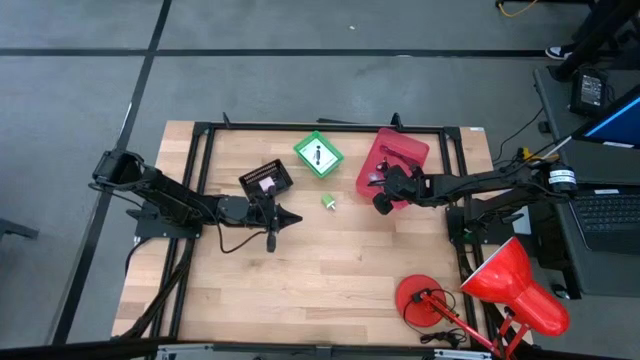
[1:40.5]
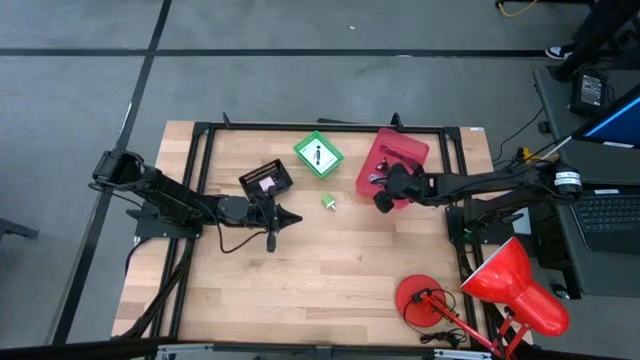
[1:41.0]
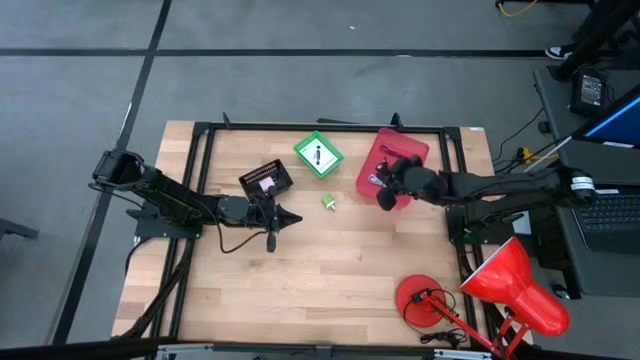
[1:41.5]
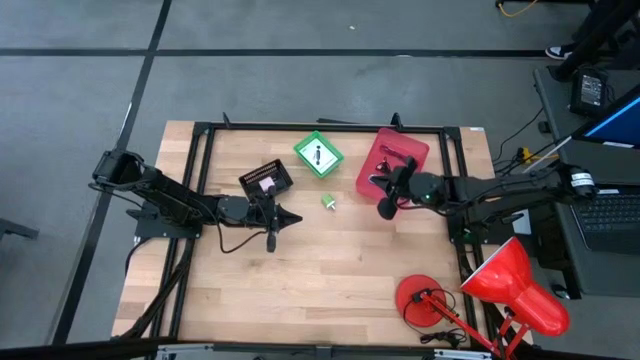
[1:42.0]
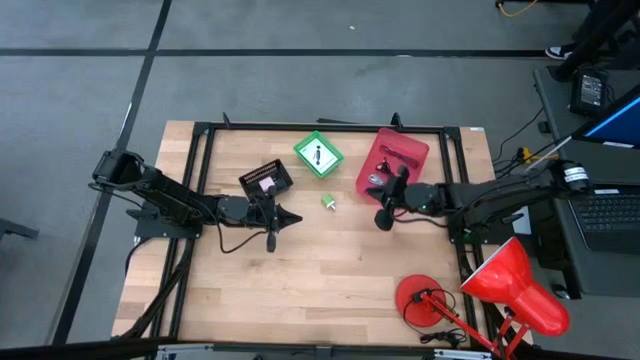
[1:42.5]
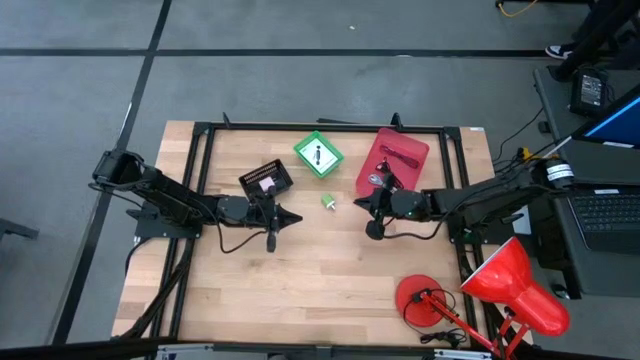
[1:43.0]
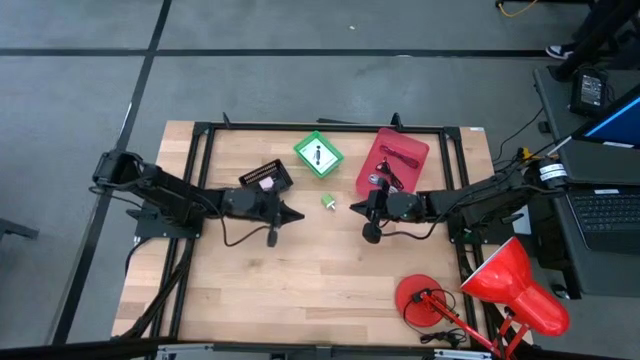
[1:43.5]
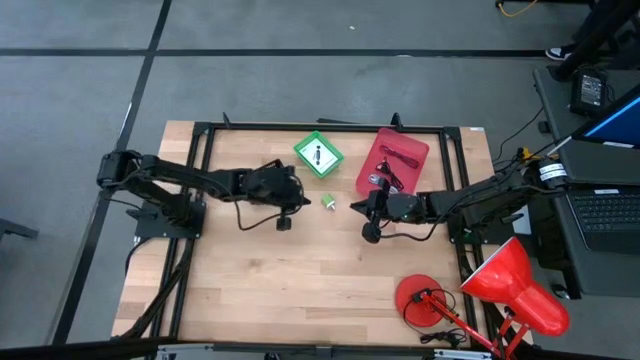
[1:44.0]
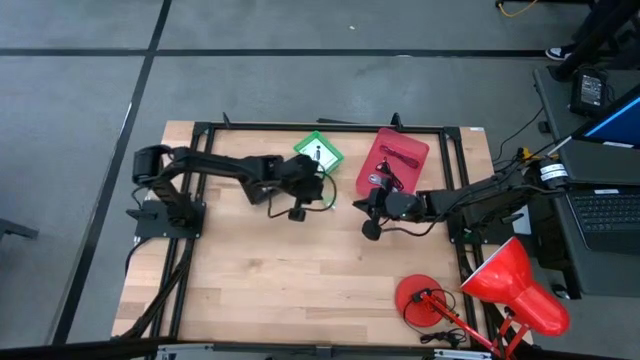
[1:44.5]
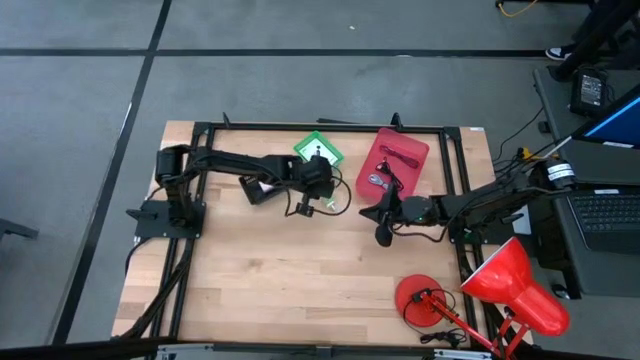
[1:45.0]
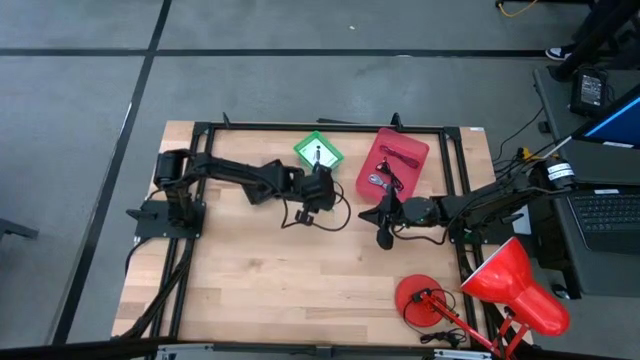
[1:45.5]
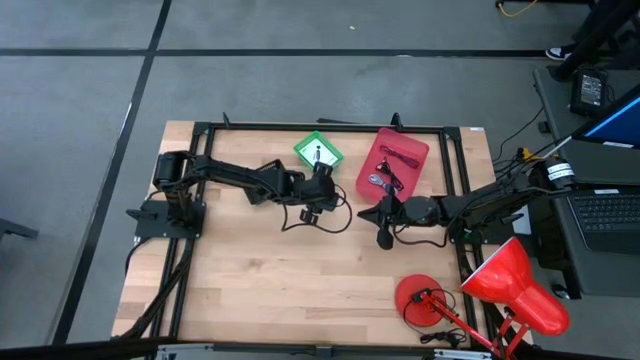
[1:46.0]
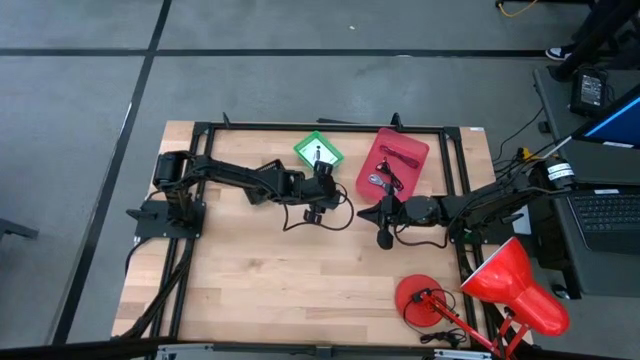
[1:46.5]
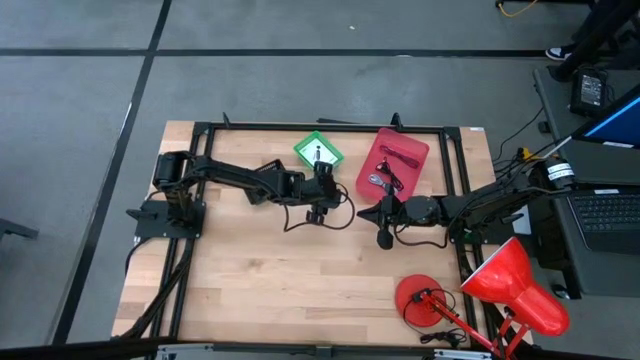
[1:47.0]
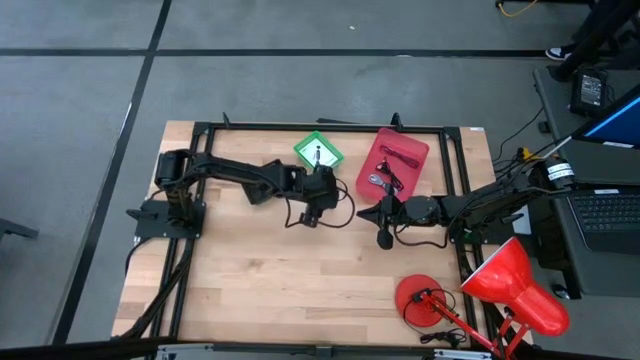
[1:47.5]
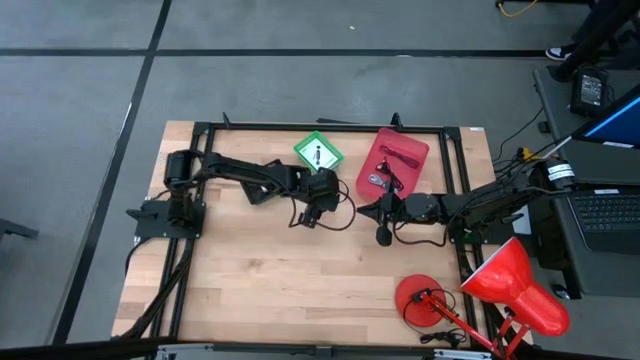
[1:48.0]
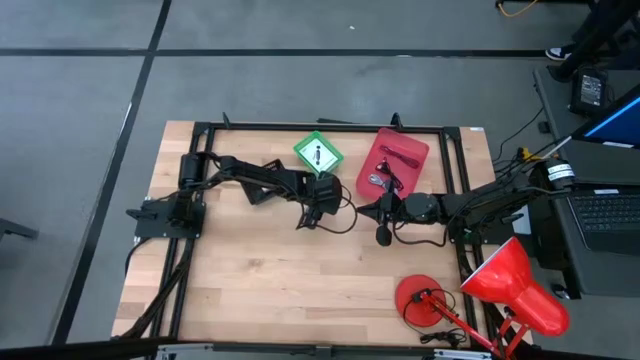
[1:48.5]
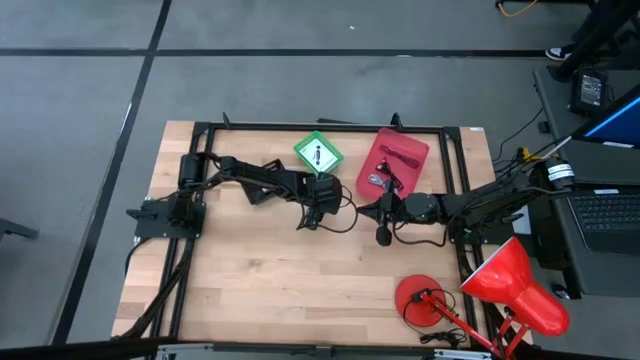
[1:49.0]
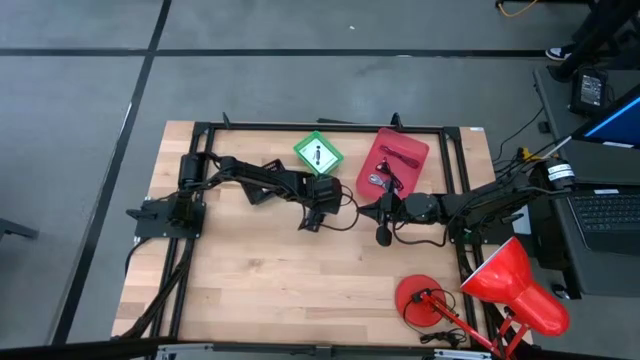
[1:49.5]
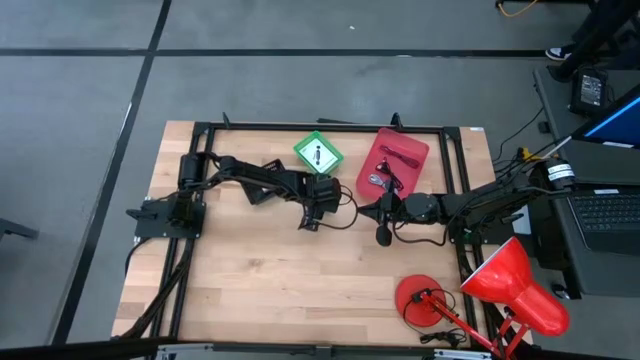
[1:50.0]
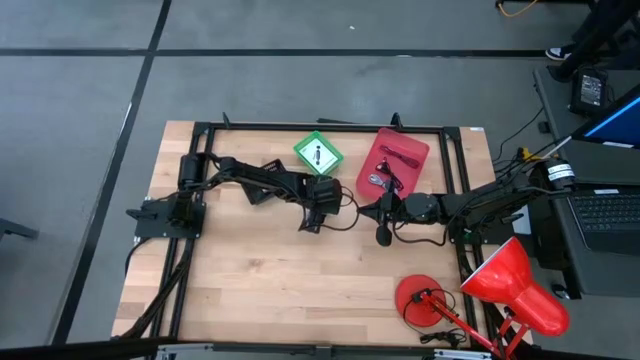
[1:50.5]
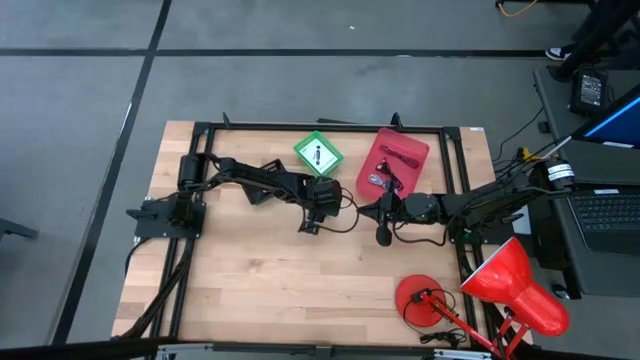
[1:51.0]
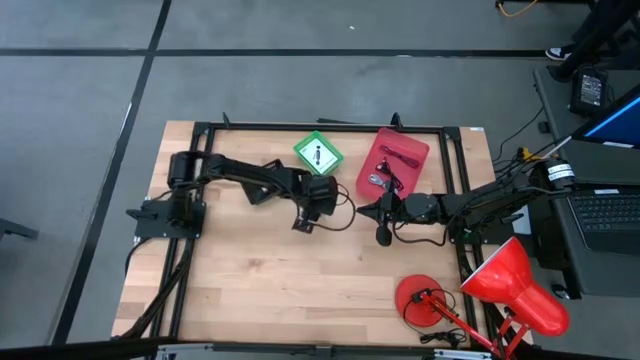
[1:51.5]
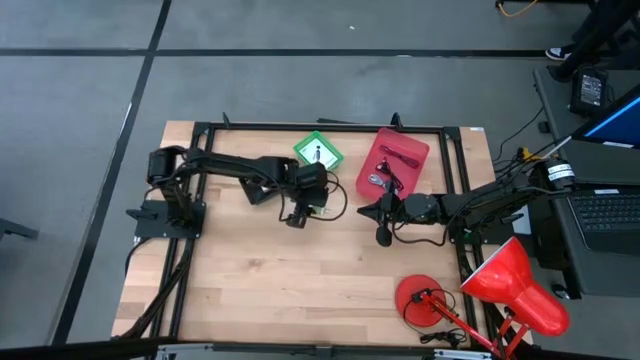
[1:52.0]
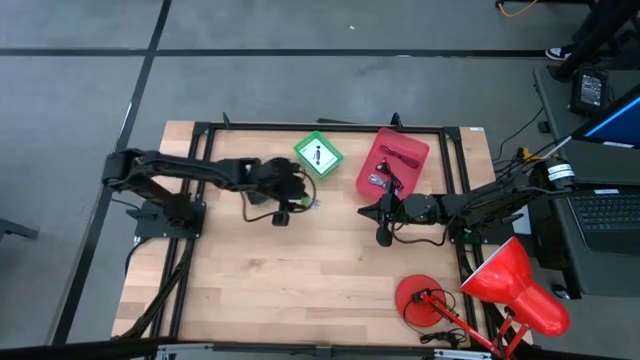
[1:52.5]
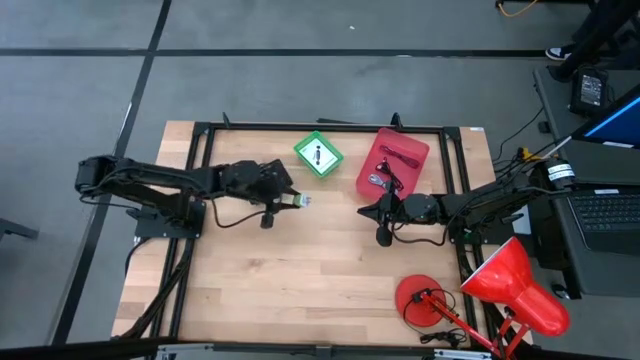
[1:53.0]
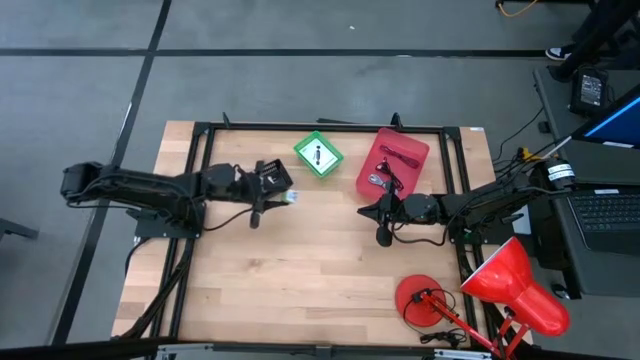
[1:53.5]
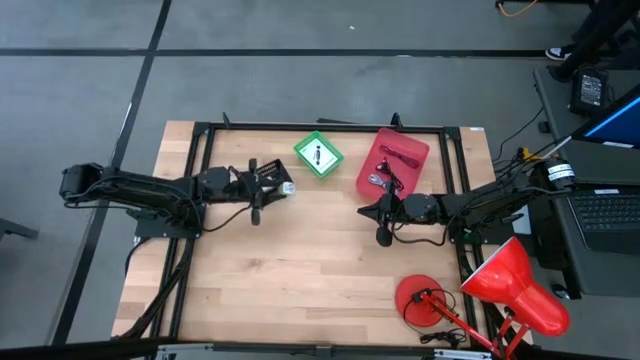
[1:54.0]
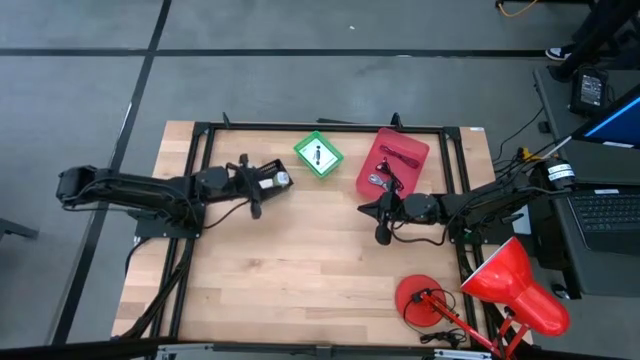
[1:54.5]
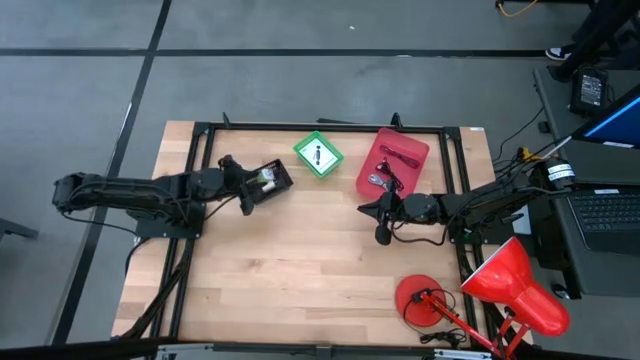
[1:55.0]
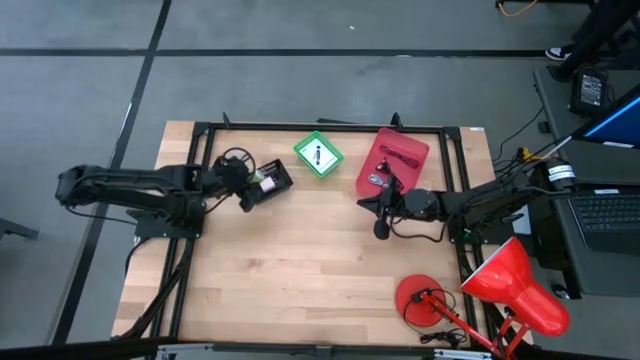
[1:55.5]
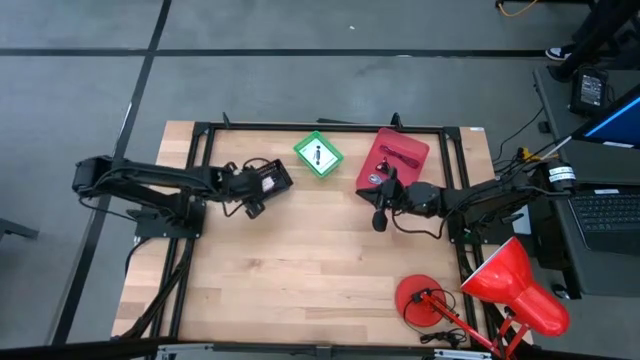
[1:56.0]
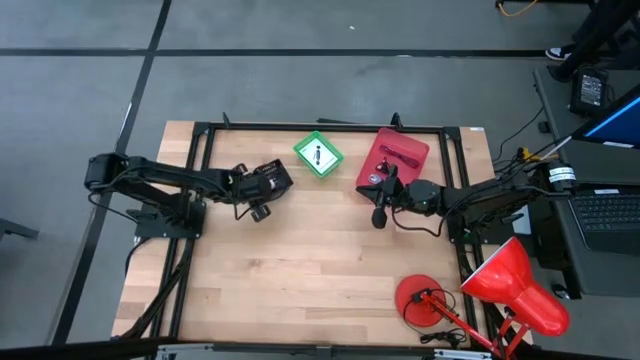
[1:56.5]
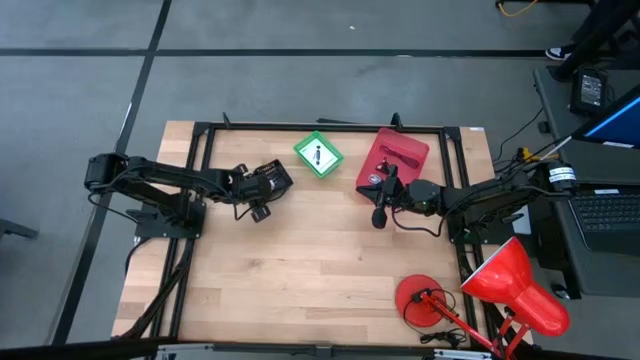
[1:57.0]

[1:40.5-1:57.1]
Task: Pick and place items into bin
Put the green charger adapter into the black bin

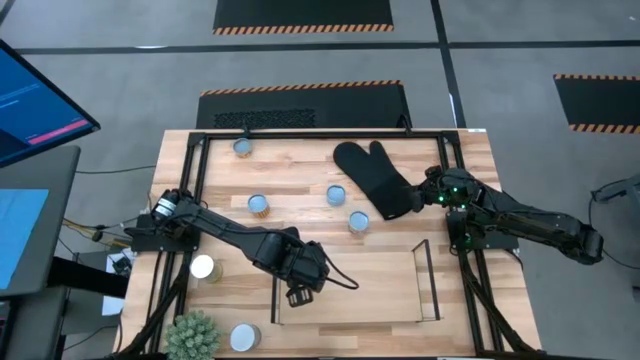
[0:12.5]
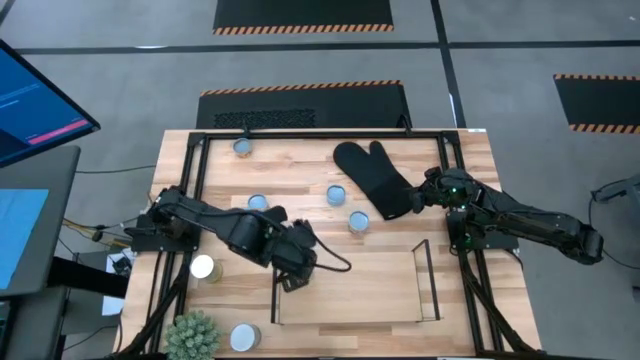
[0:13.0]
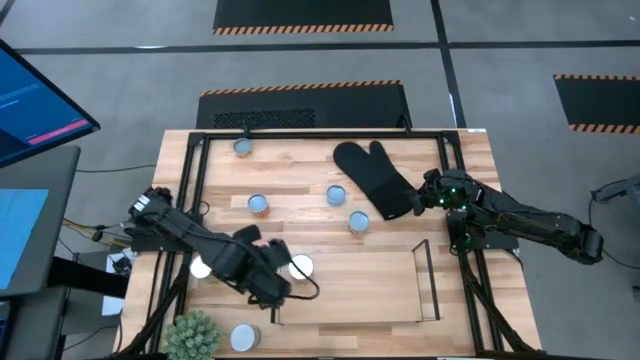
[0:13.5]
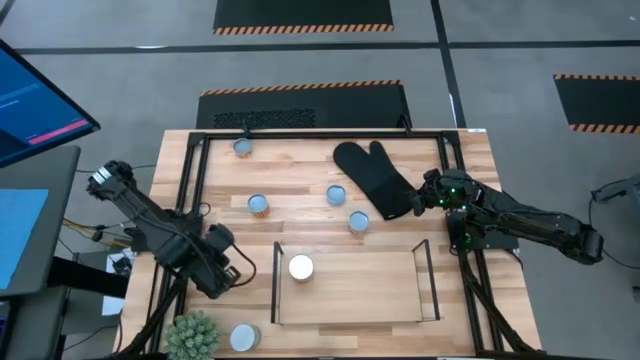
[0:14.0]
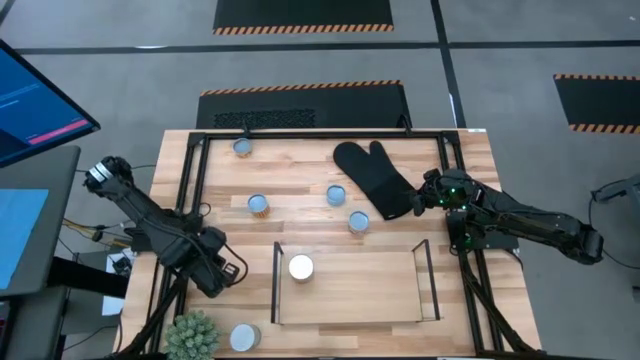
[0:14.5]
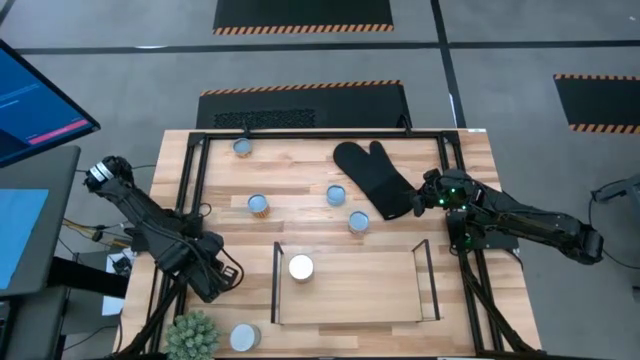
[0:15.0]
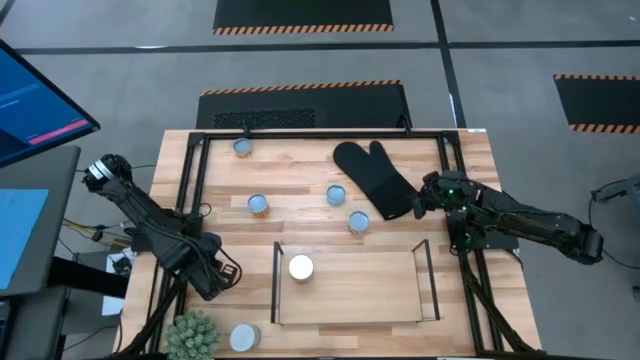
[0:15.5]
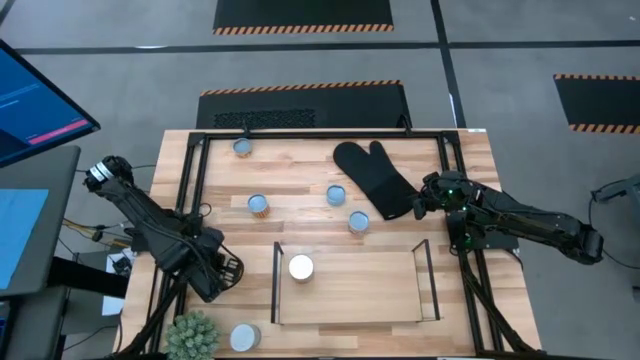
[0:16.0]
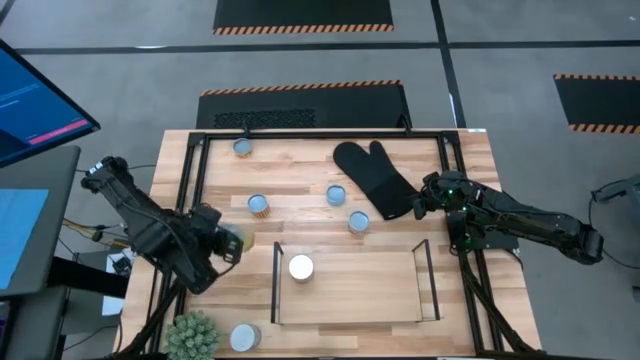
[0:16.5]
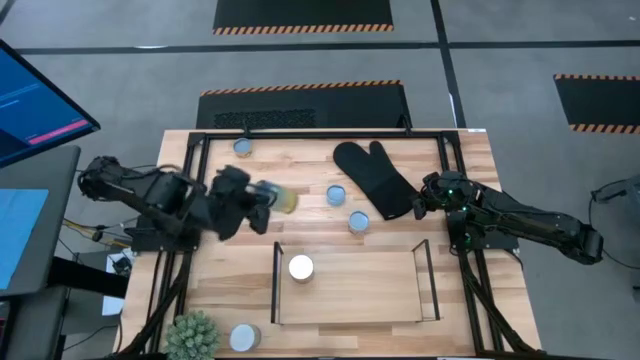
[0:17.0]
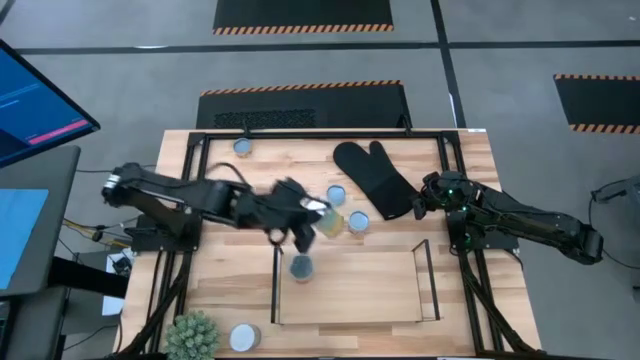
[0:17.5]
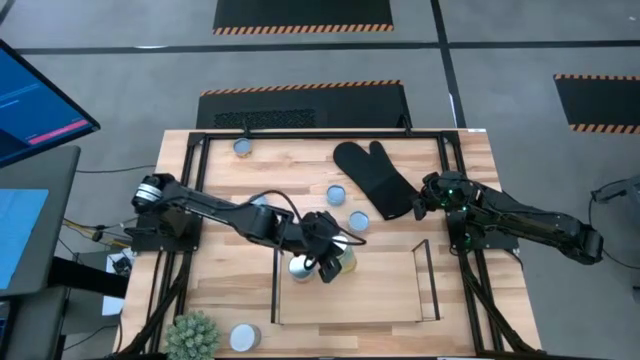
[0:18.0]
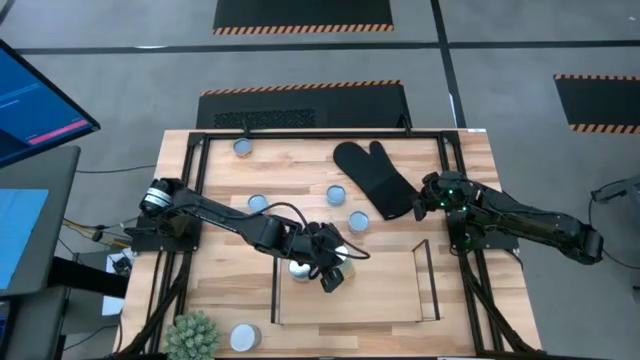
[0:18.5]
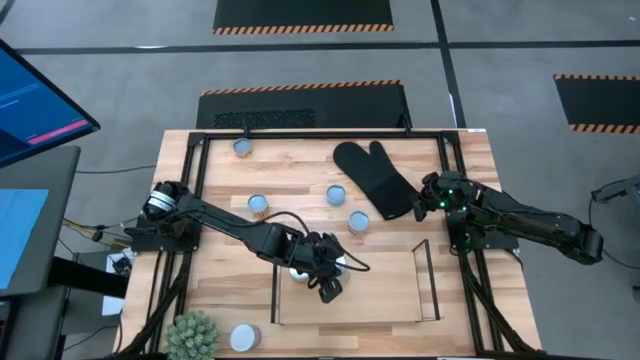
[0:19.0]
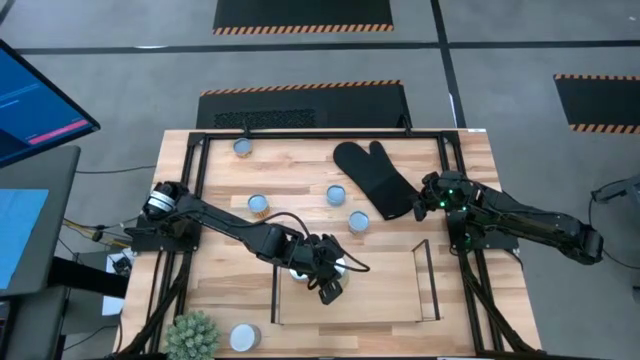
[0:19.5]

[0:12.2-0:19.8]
Task: Pick and place cans onto a shelf
Put the canned carrots on the shelf
